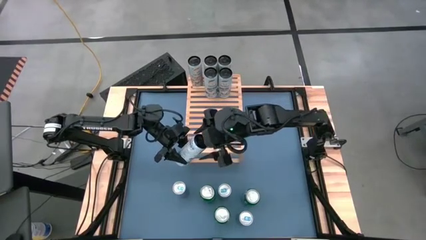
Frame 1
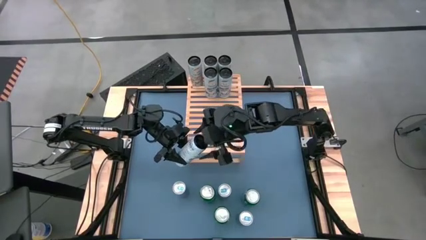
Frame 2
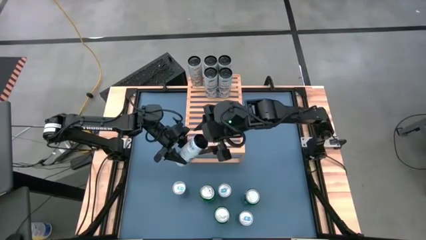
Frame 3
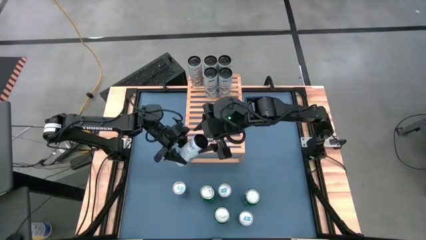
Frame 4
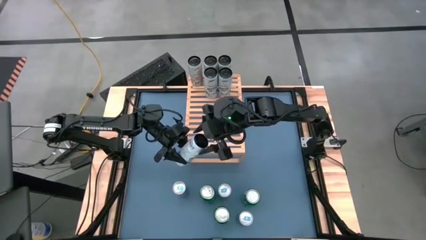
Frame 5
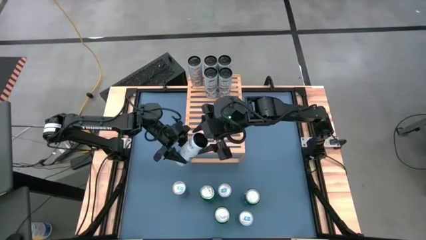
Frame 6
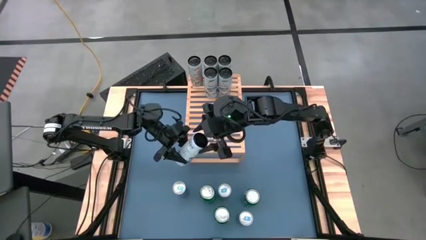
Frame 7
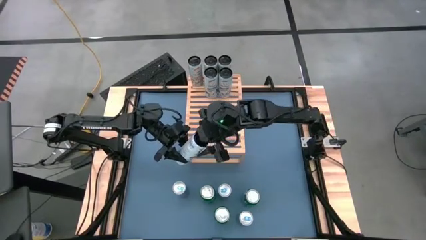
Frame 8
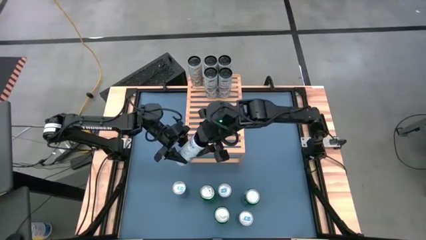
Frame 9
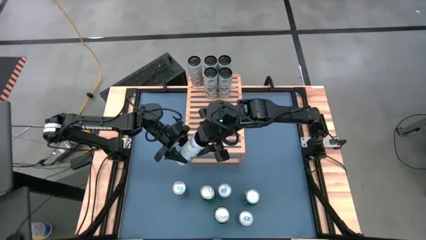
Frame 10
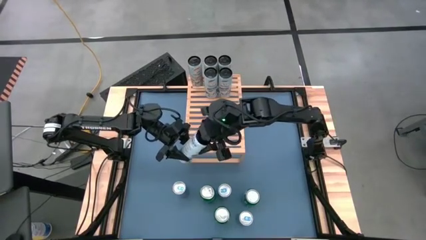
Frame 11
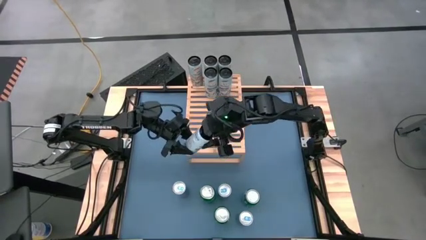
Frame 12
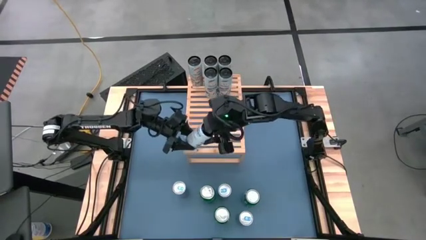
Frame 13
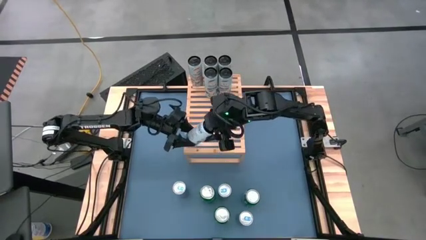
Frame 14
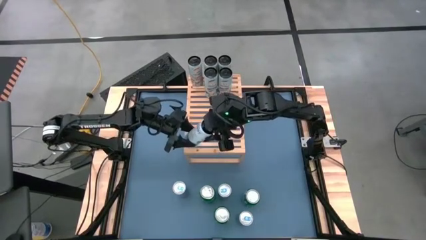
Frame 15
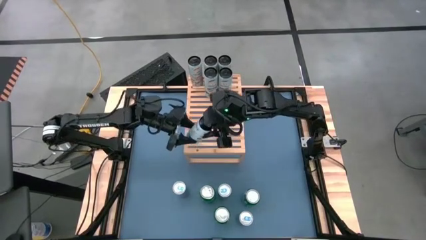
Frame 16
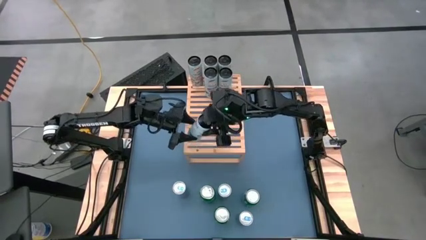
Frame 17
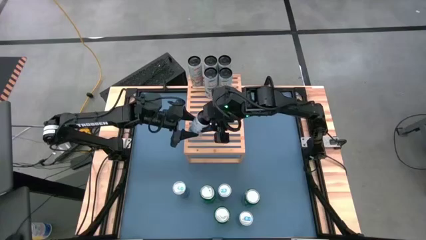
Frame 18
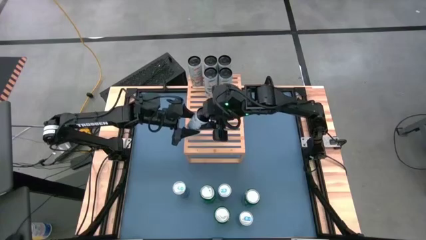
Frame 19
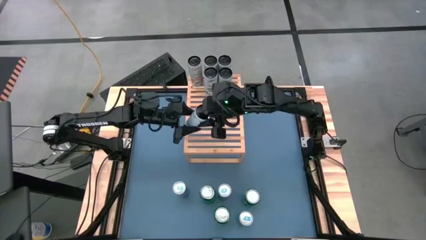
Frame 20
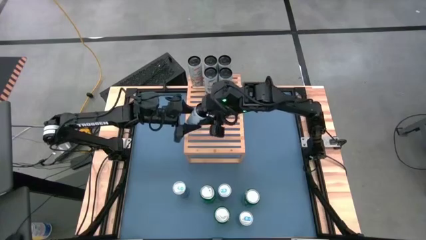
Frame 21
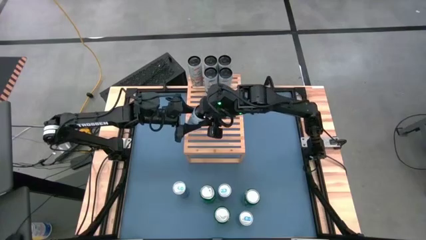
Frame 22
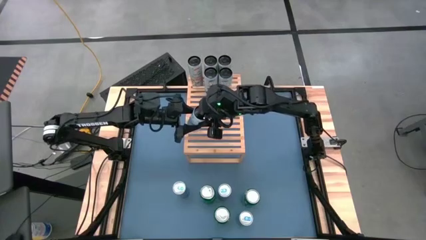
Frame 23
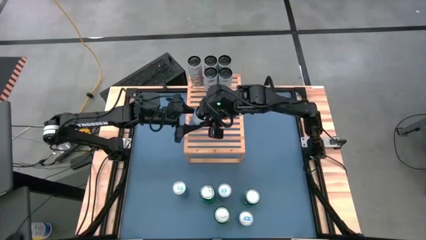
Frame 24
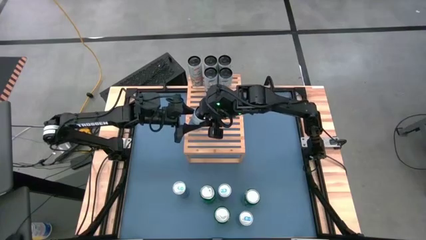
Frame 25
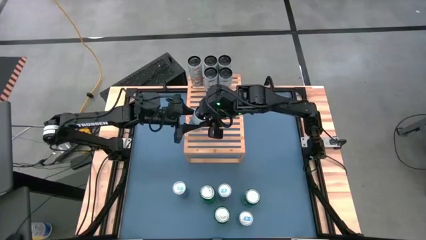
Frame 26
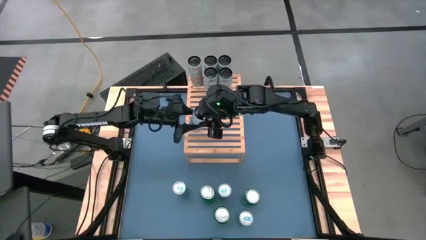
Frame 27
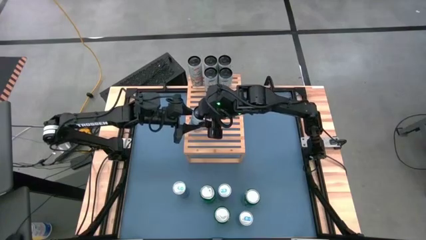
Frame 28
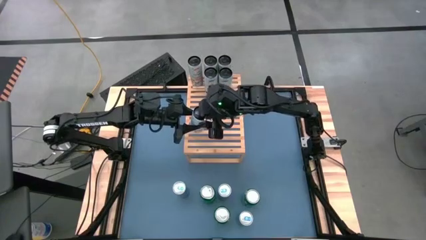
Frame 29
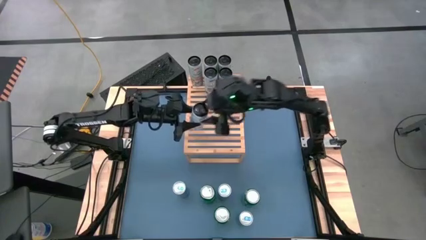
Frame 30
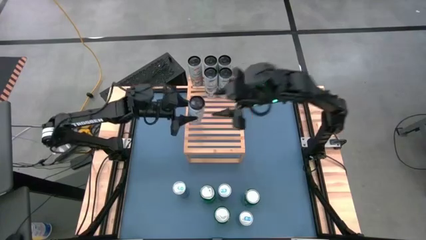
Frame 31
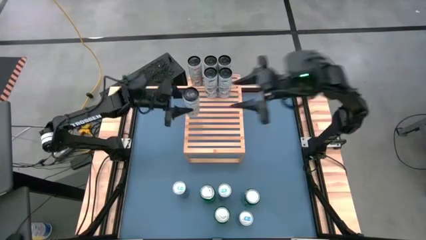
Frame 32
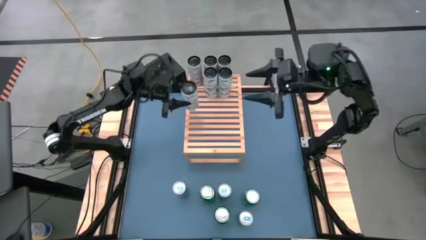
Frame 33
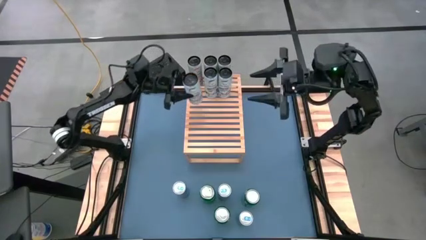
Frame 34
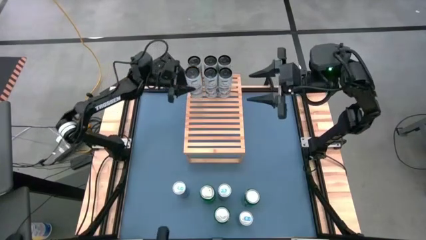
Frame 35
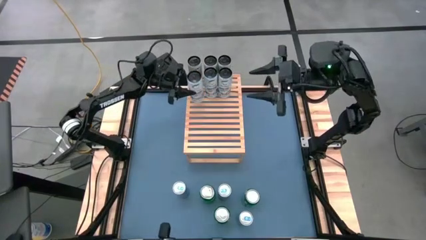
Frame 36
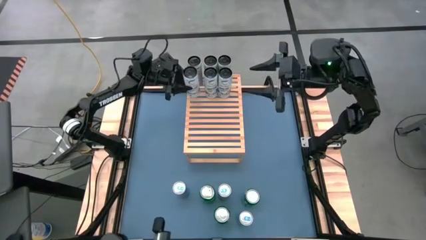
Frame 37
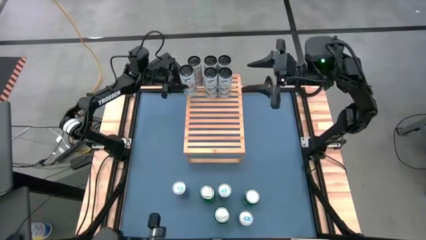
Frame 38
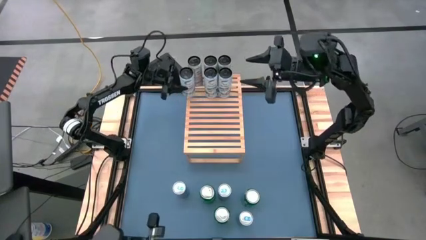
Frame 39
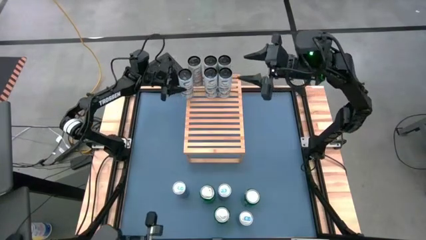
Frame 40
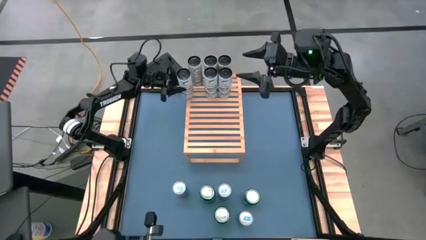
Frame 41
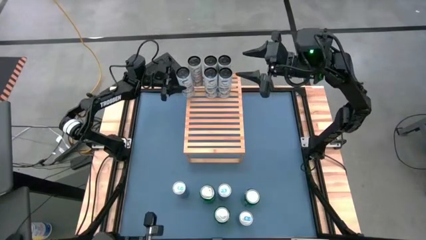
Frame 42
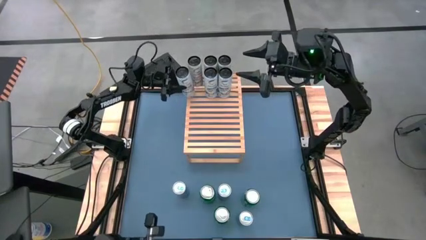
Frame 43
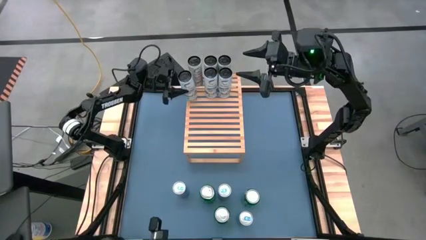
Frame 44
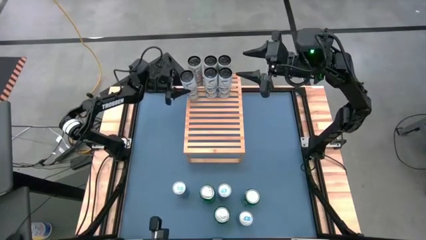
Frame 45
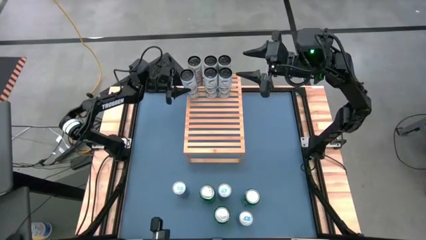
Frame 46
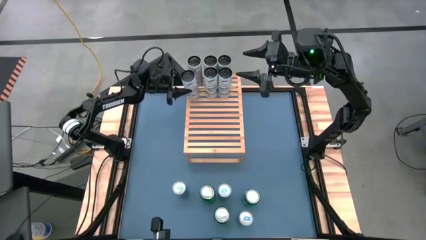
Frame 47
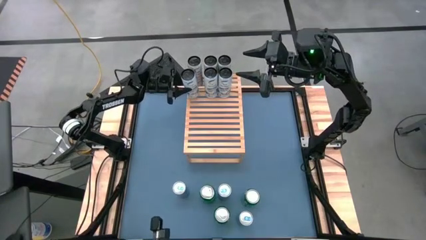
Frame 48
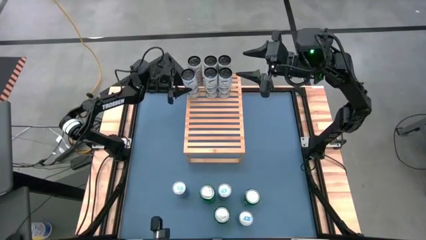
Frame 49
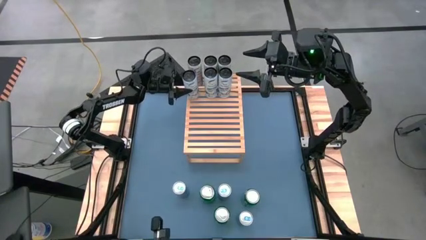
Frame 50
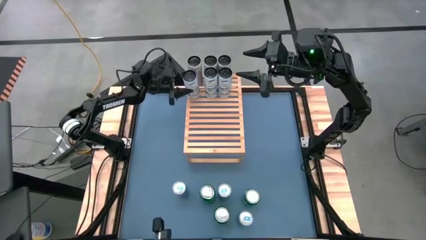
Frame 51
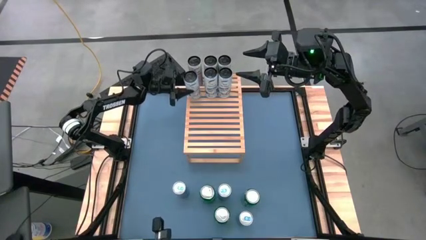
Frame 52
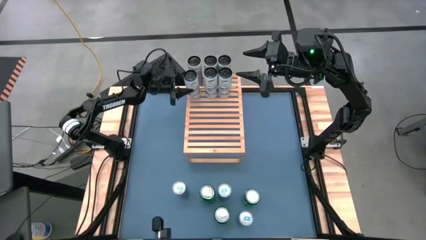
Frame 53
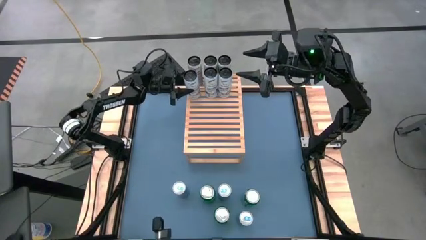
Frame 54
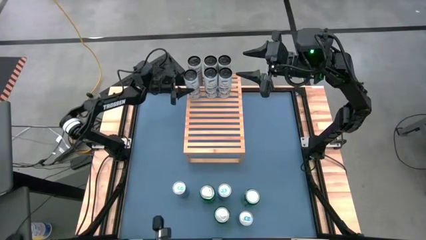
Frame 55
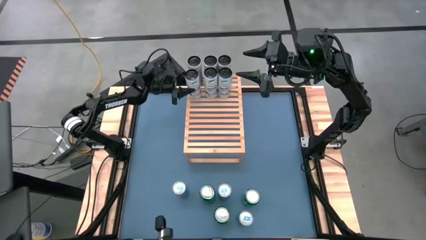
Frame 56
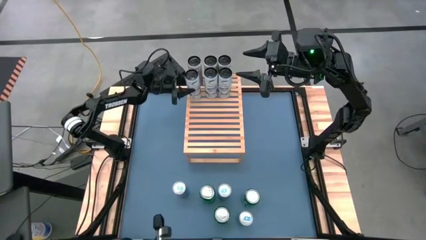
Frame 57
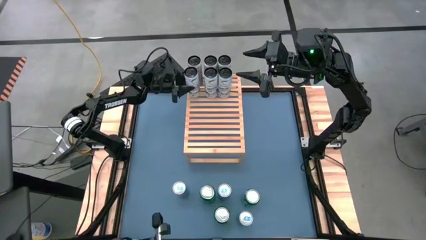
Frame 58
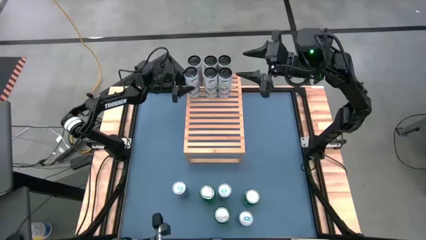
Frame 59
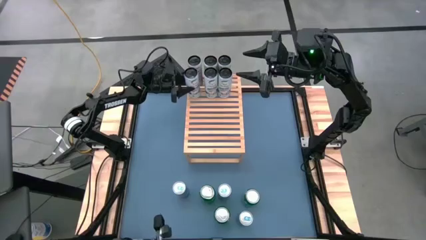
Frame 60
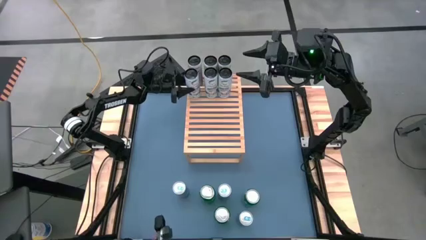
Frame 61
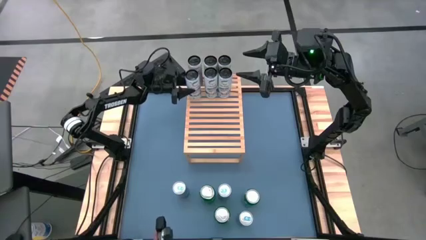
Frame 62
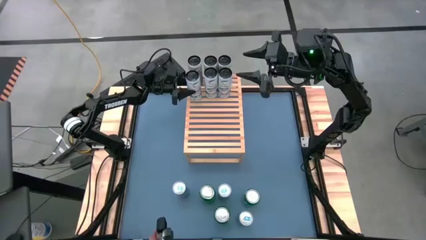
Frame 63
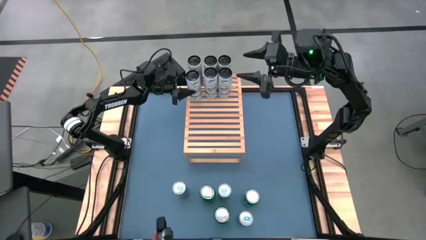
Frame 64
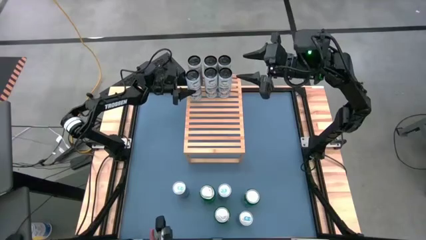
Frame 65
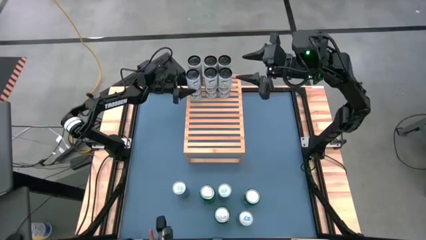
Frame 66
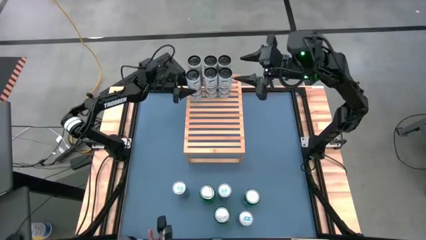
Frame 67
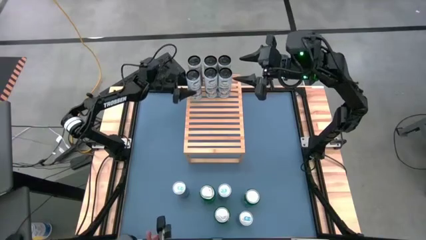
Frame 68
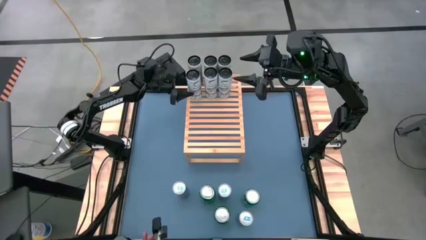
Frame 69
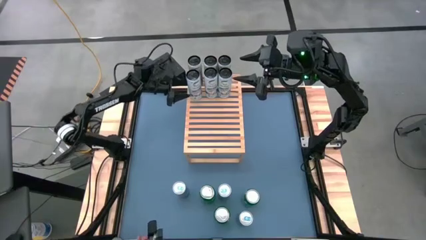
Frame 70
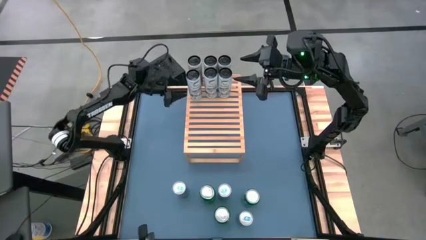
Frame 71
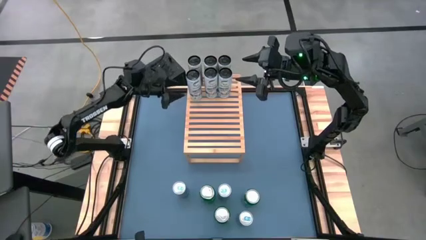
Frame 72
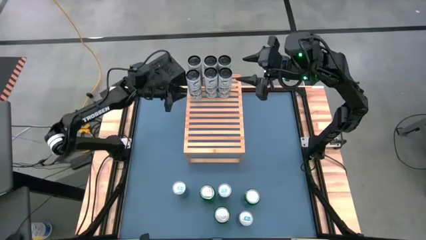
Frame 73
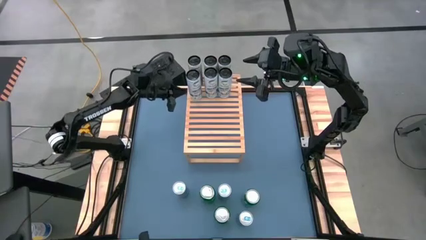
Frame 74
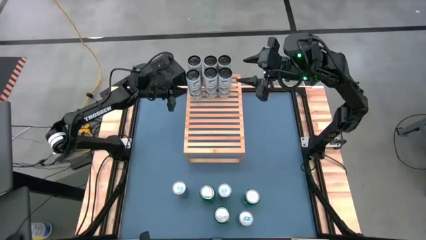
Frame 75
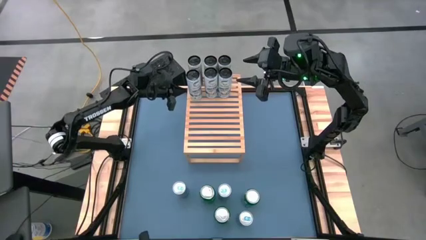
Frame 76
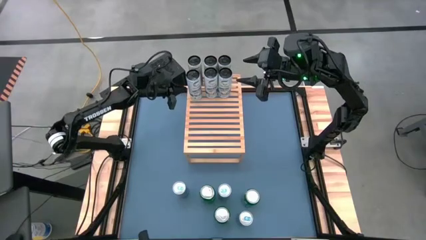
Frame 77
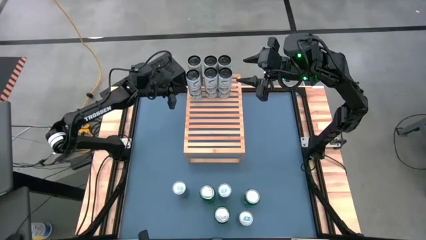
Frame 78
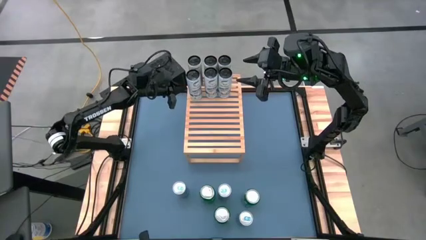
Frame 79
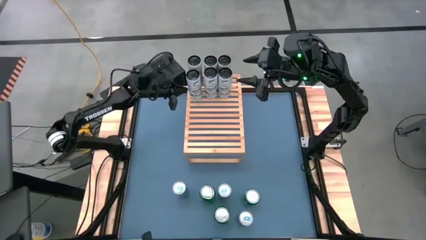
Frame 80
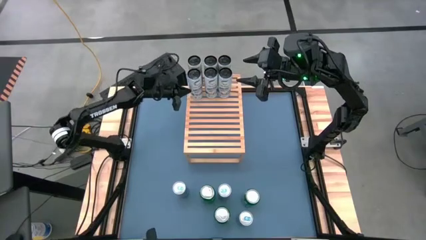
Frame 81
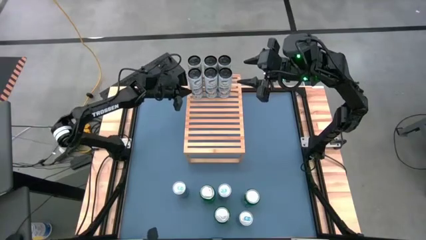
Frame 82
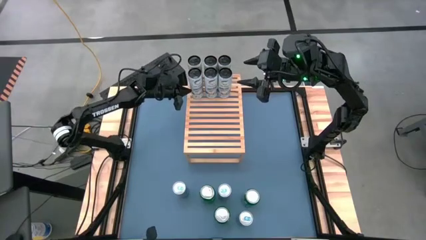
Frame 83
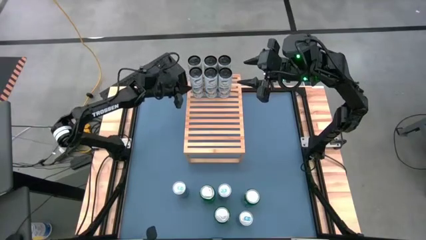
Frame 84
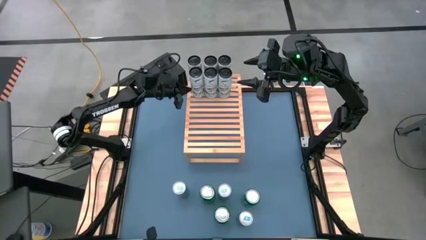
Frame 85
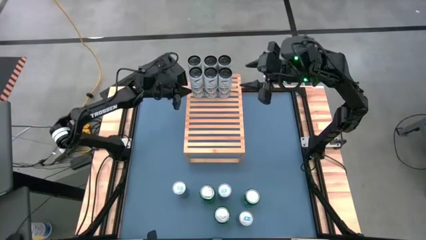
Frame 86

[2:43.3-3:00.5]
Task: Place canned beverage on shelf
Put the white blue soda can on the shelf aligned to the other white blue soda can
